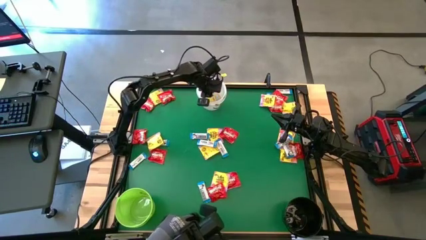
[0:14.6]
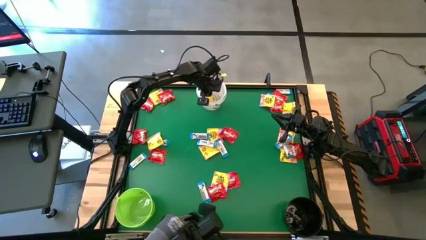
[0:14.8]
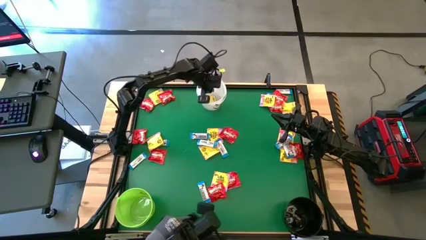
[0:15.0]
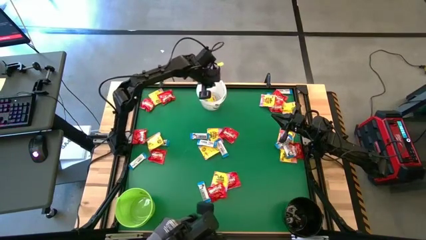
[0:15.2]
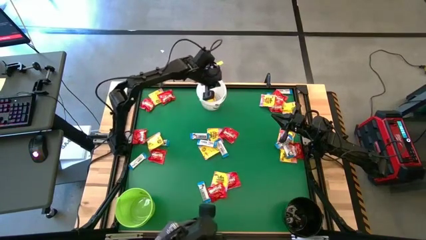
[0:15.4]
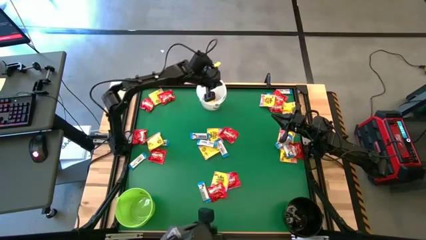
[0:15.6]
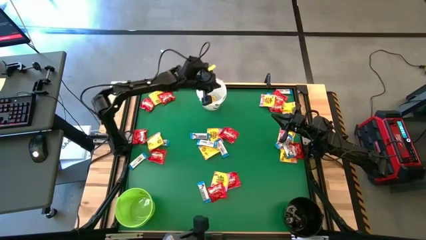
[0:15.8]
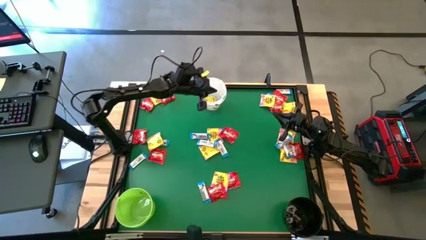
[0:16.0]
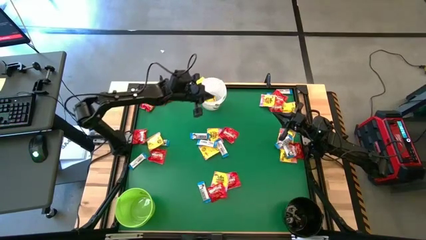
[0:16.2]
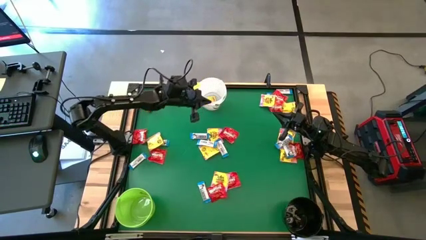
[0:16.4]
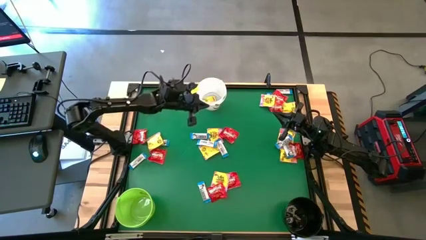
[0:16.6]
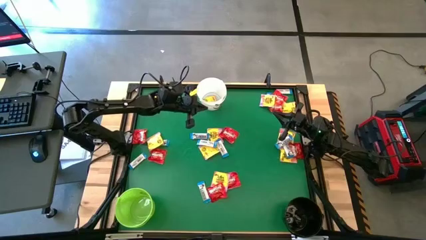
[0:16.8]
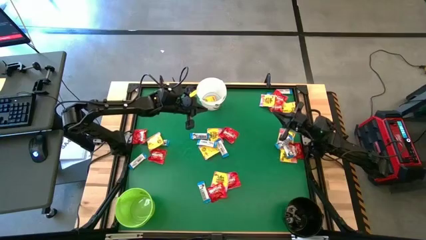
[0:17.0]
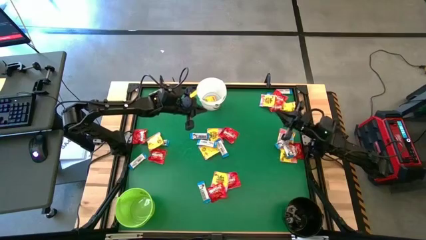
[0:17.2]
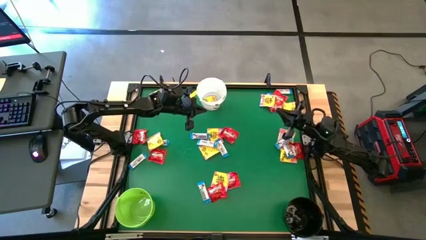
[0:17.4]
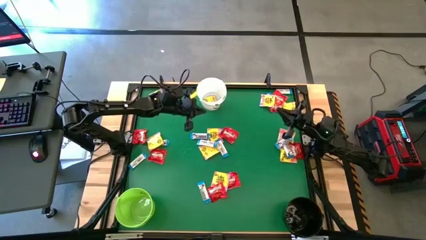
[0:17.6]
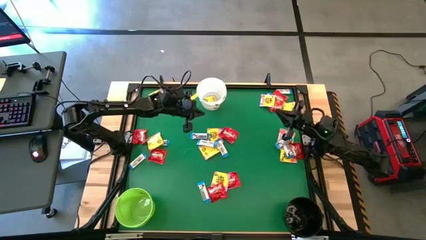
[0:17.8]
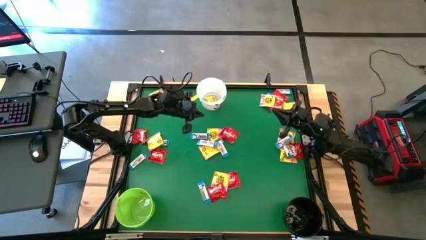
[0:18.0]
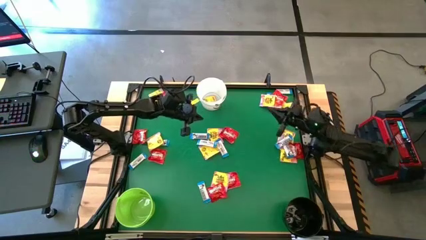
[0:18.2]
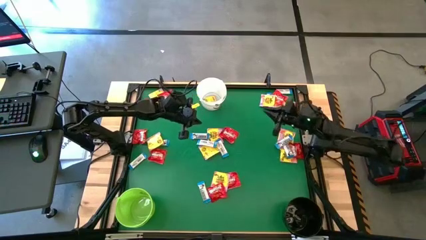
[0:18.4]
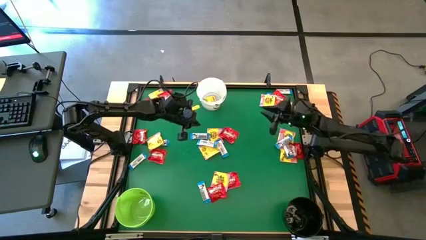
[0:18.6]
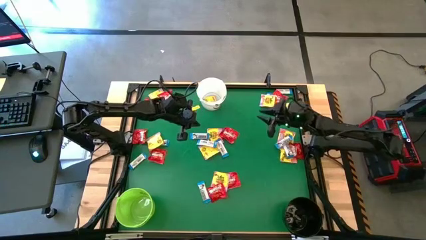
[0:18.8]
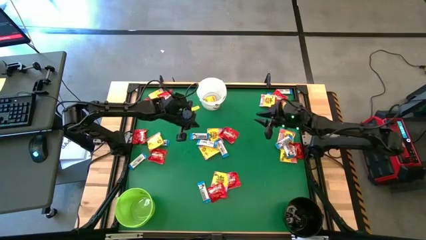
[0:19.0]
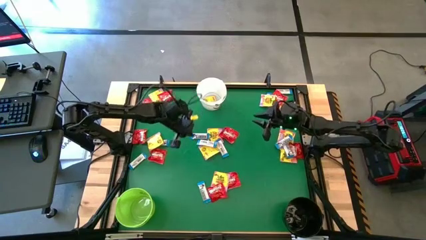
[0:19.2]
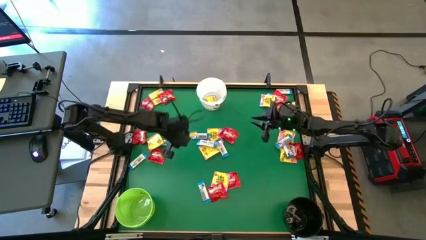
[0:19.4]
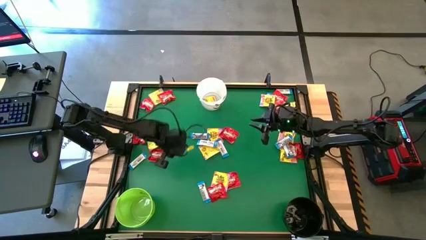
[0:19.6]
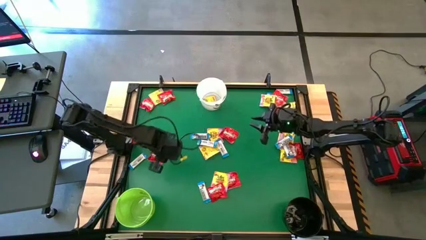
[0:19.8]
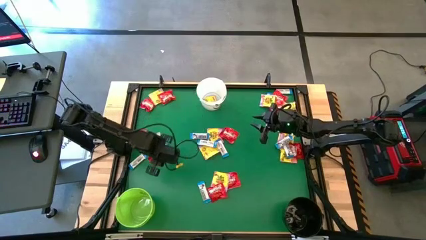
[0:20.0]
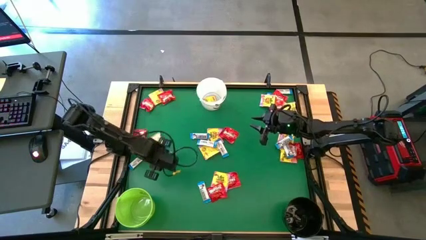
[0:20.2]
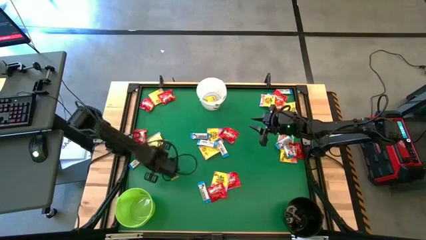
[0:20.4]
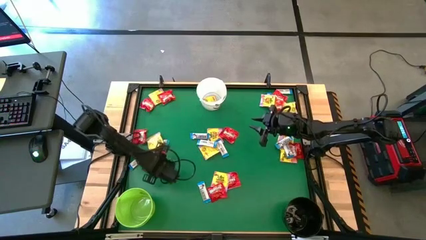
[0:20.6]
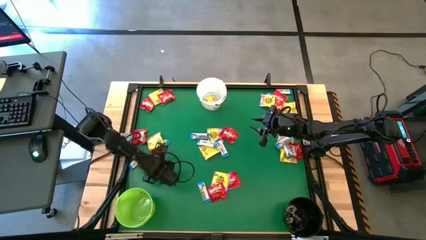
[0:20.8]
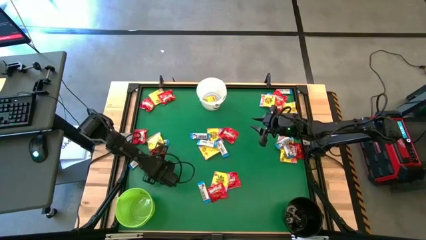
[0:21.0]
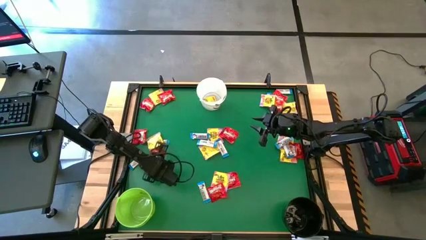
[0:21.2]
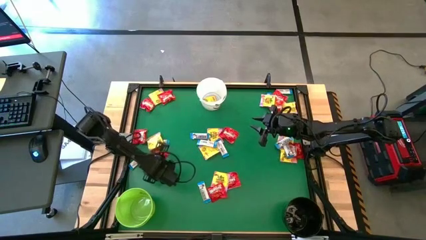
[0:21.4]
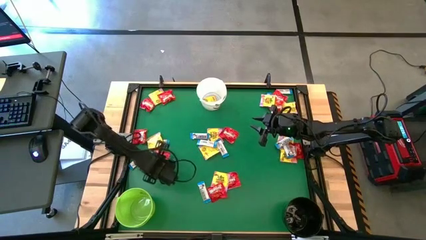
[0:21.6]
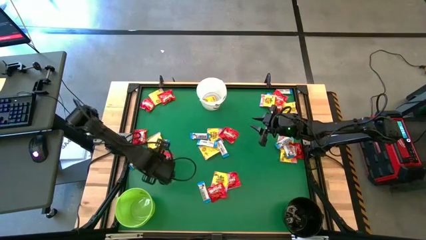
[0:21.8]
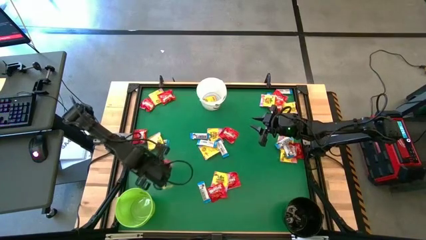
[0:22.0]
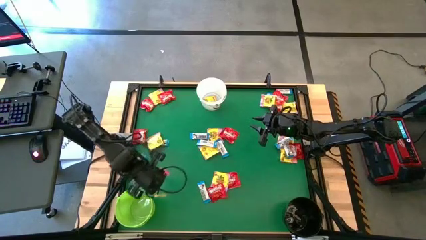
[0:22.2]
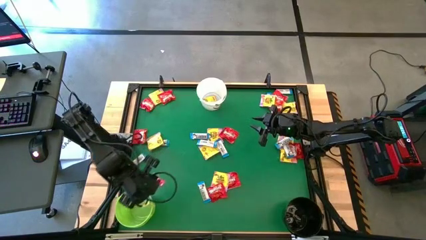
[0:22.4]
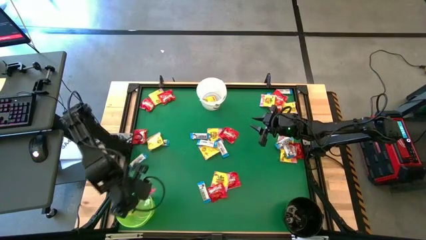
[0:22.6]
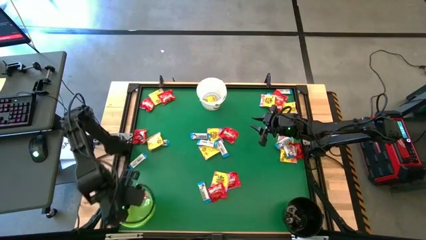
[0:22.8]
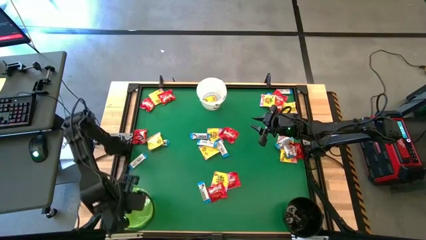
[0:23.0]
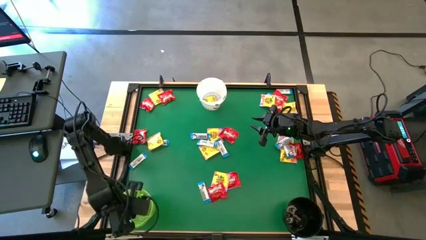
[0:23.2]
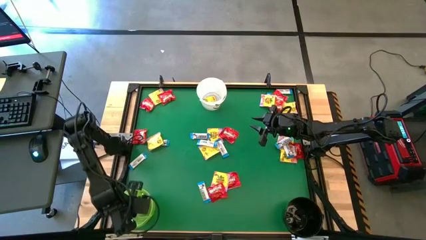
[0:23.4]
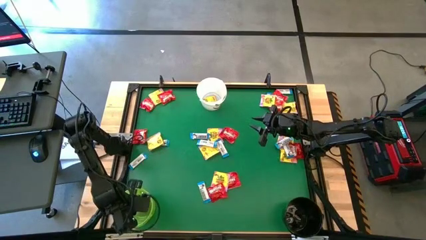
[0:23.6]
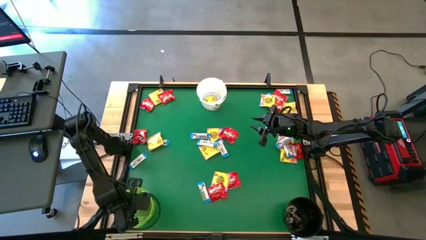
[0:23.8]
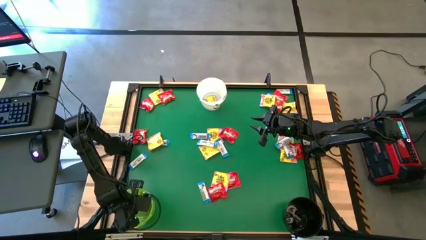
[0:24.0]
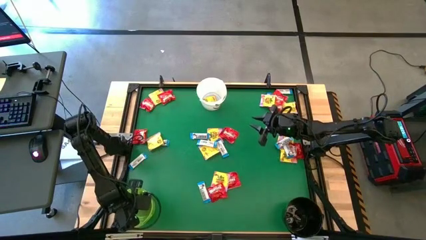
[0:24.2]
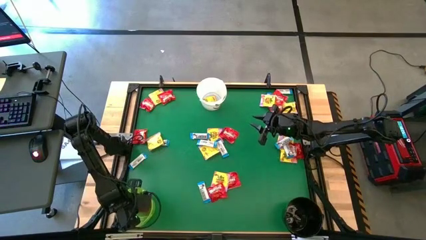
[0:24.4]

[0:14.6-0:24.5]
Task: Sort candy by brand, put in halloween buckets
Put the red candy into the green bucket

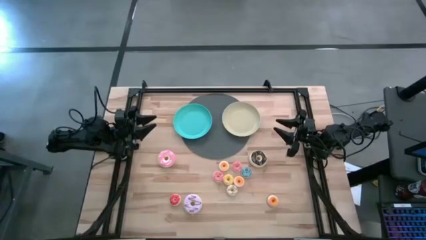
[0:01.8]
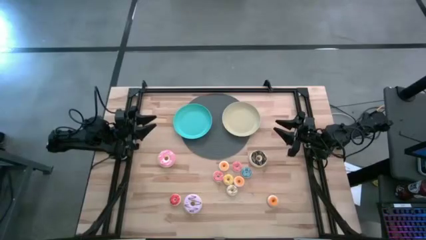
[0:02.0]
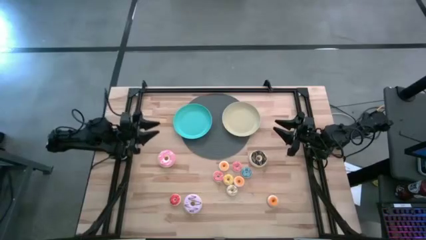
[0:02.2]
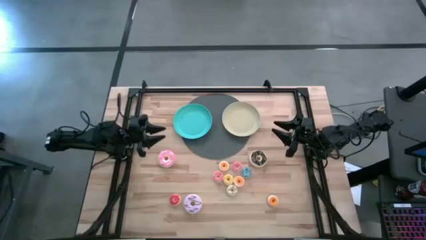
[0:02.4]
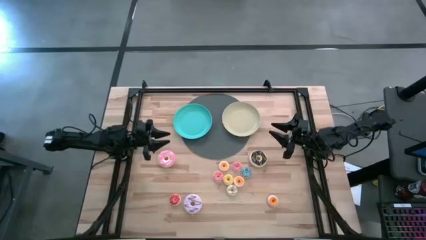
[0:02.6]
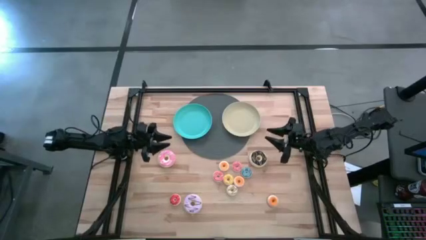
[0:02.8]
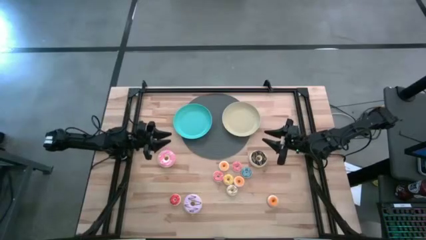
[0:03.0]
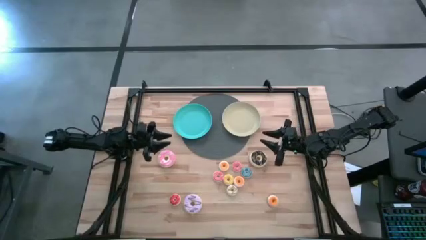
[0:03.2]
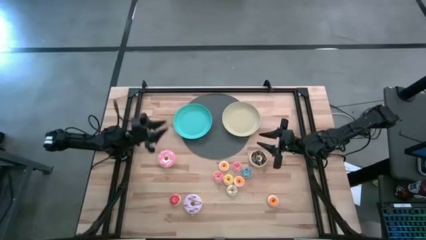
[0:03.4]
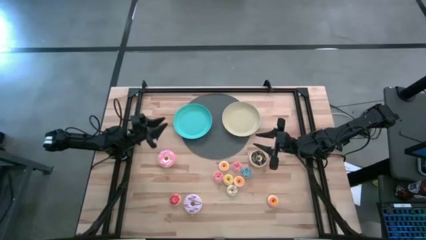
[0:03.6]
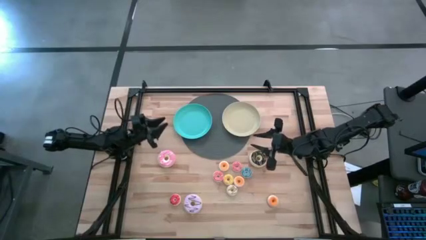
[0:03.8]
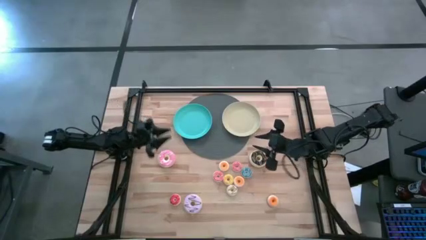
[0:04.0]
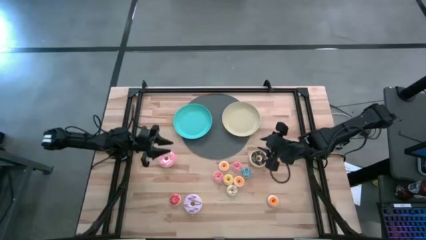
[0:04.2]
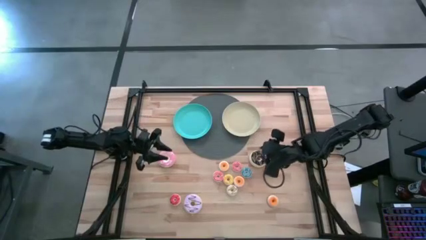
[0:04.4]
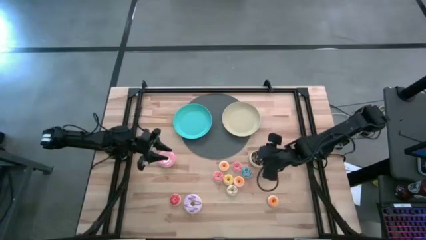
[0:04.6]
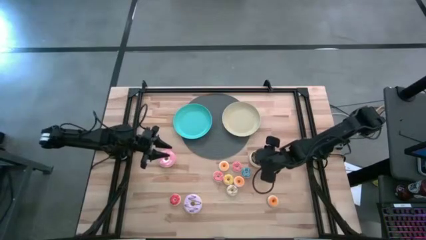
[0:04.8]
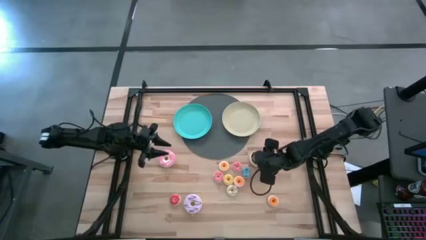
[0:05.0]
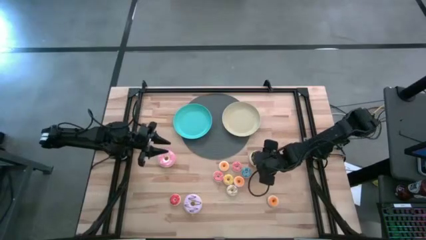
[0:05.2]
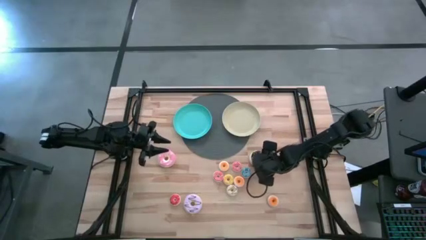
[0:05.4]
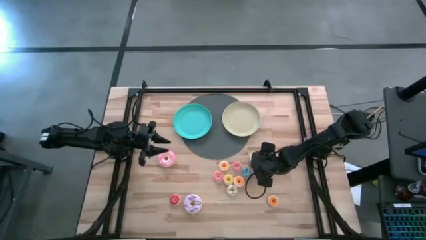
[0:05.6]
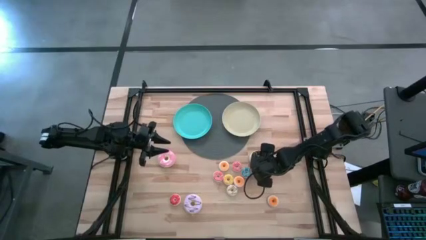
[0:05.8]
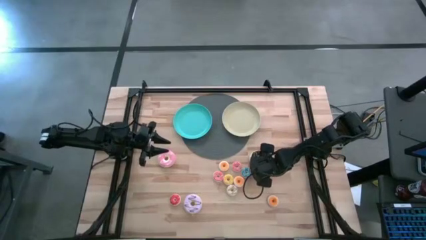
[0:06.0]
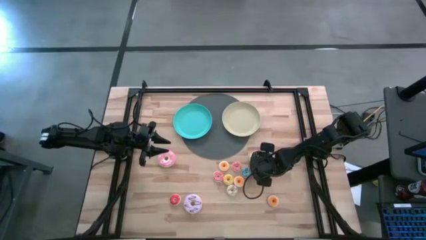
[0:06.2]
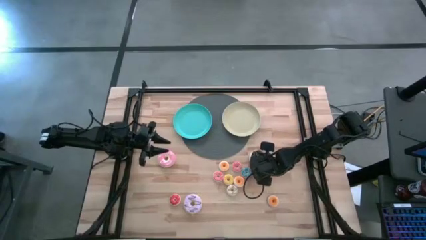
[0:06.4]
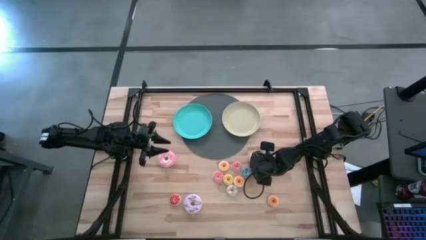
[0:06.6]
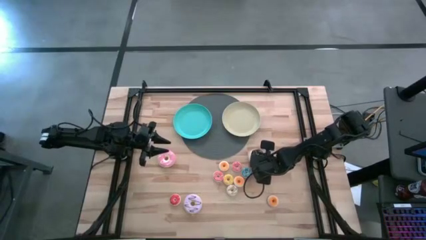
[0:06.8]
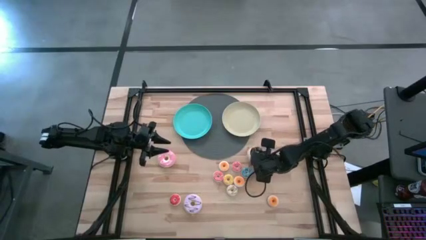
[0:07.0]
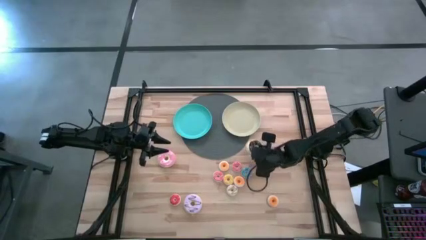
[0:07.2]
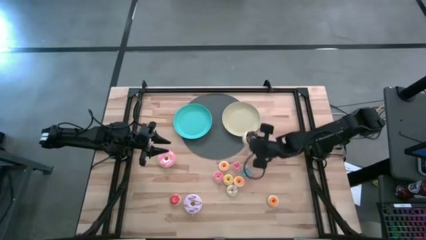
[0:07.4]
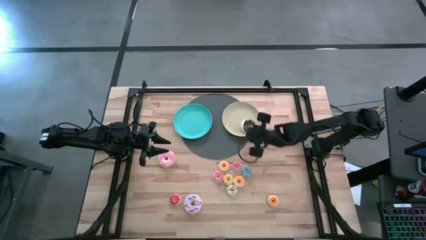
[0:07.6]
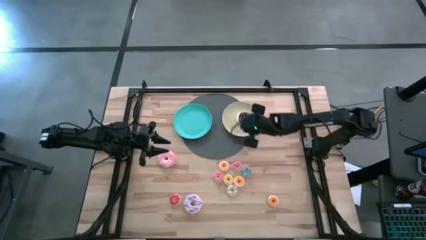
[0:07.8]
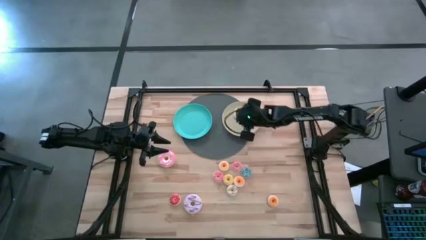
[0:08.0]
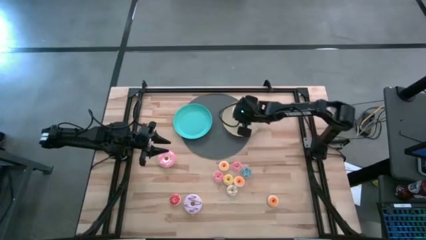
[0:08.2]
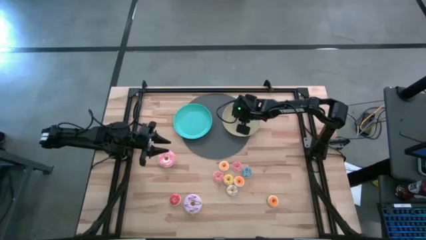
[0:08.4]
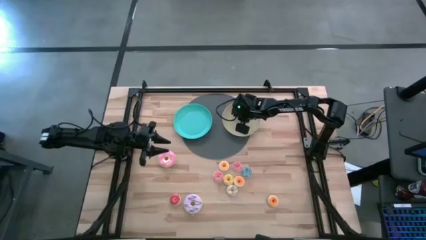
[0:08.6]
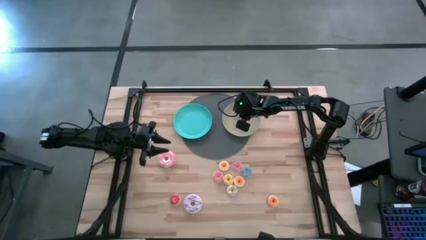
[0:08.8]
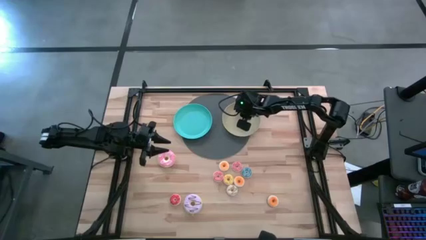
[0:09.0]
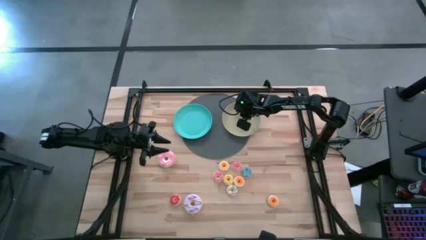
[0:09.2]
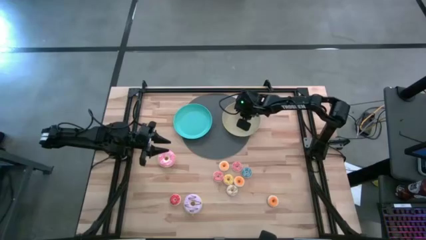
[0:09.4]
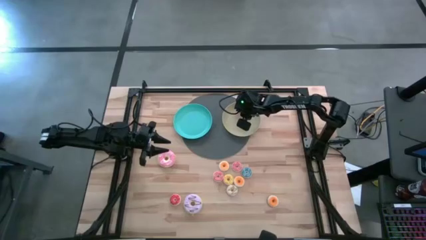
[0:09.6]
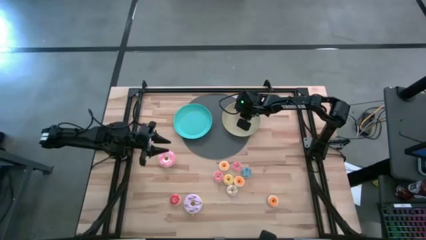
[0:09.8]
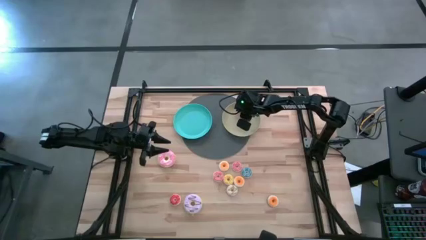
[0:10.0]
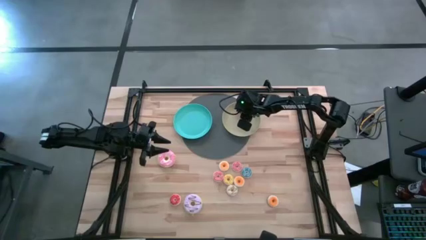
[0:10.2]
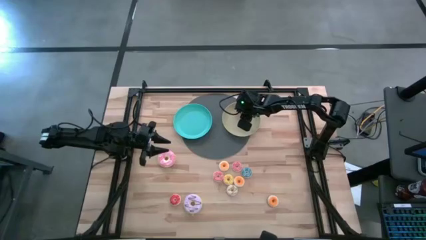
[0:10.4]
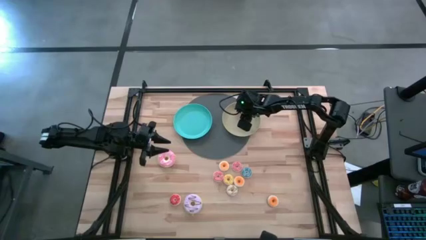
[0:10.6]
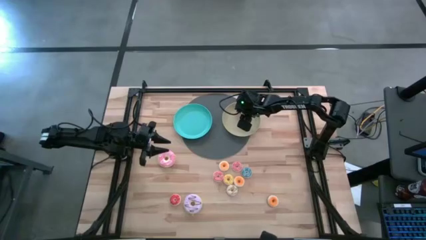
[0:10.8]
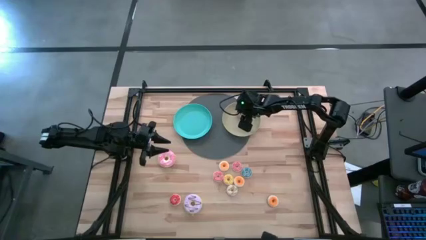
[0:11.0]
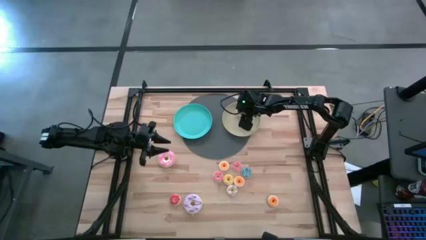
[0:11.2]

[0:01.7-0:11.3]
Task: Pick & Place donuts
Put the large black donut on the brown plate
